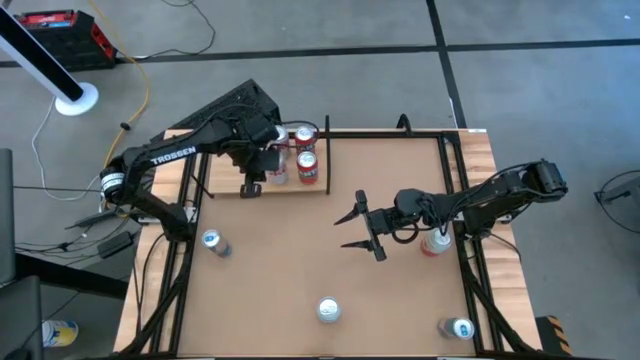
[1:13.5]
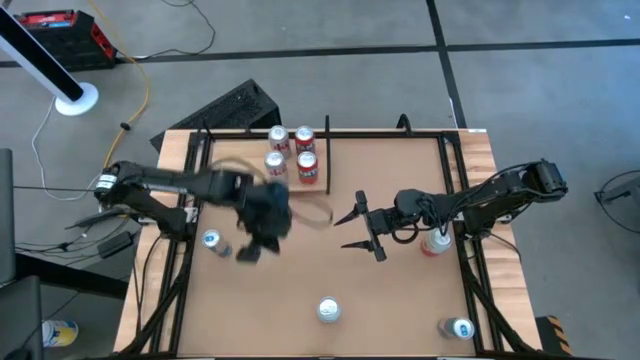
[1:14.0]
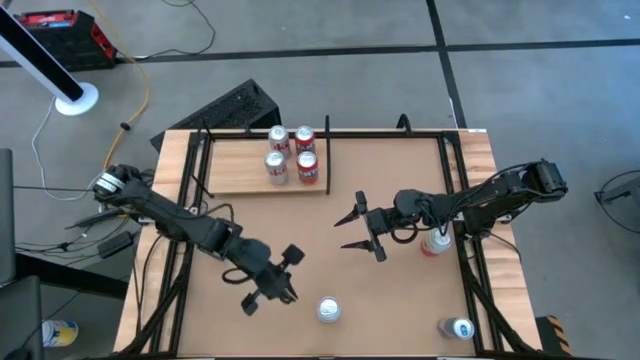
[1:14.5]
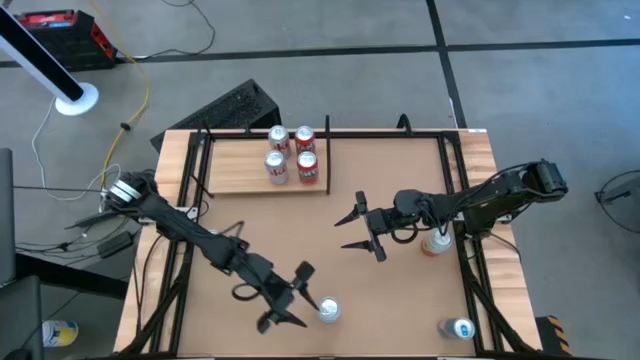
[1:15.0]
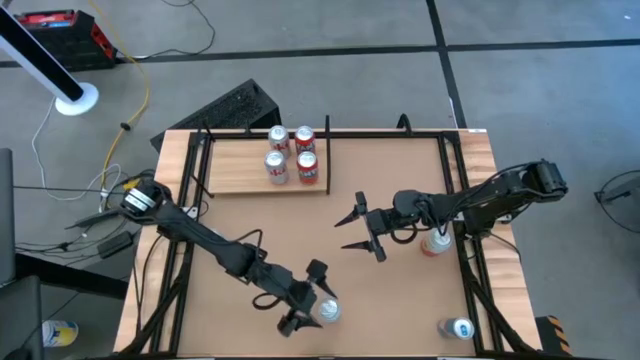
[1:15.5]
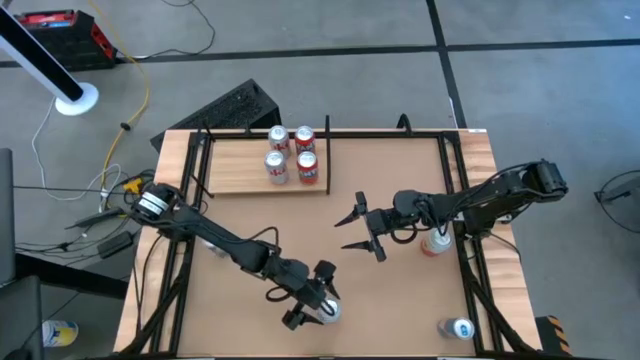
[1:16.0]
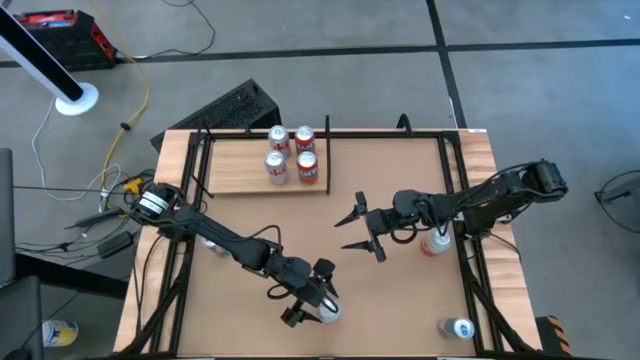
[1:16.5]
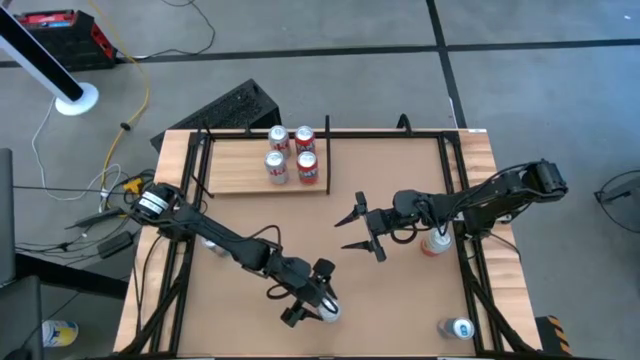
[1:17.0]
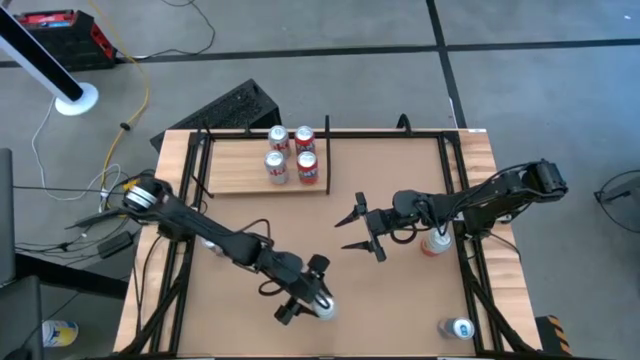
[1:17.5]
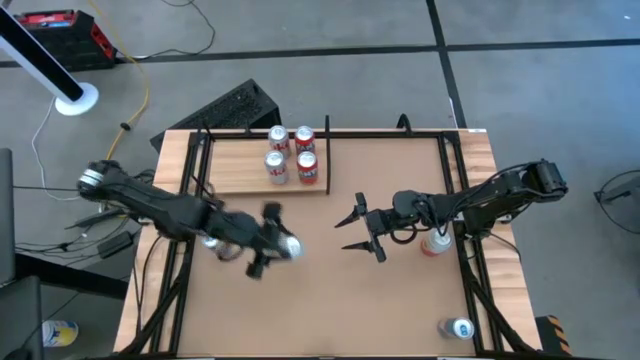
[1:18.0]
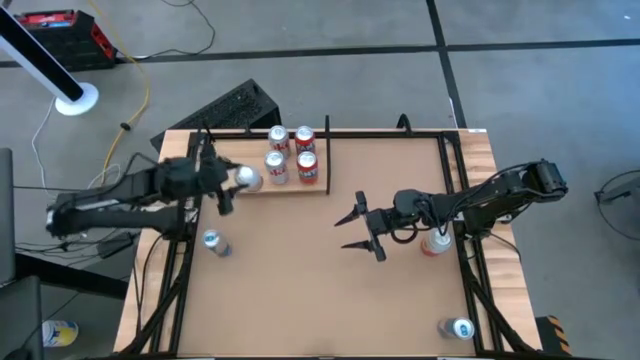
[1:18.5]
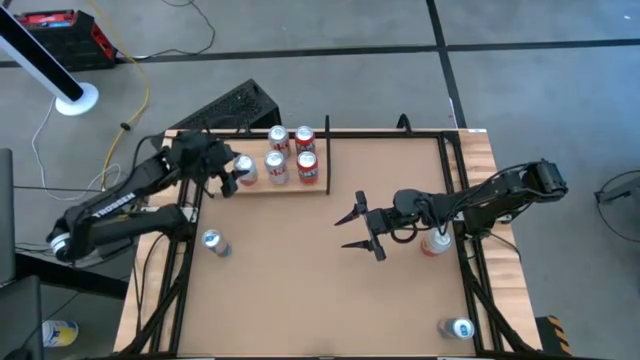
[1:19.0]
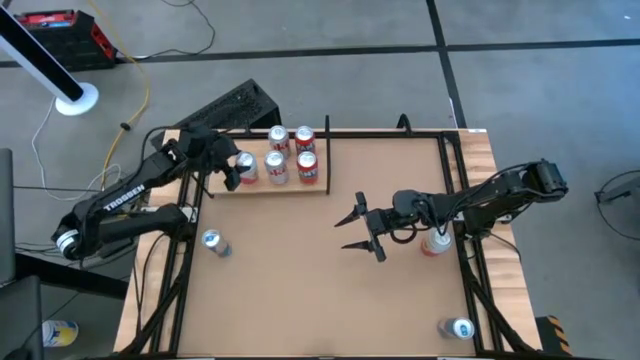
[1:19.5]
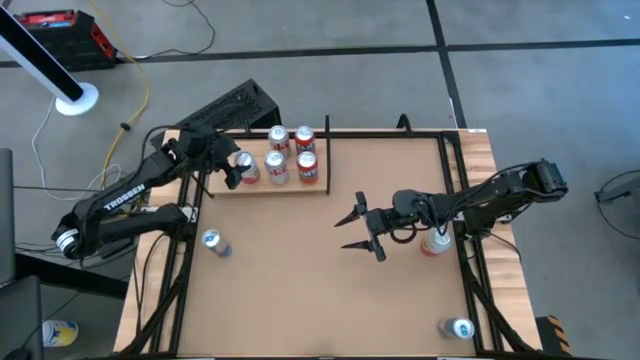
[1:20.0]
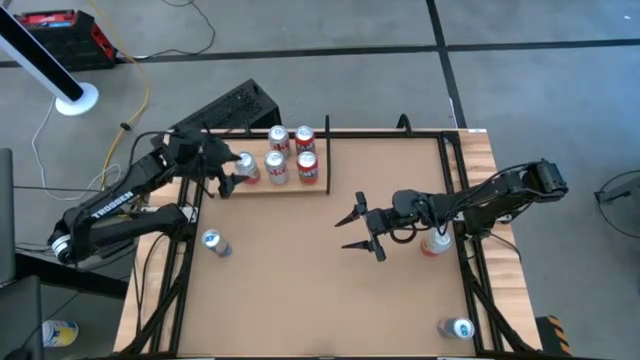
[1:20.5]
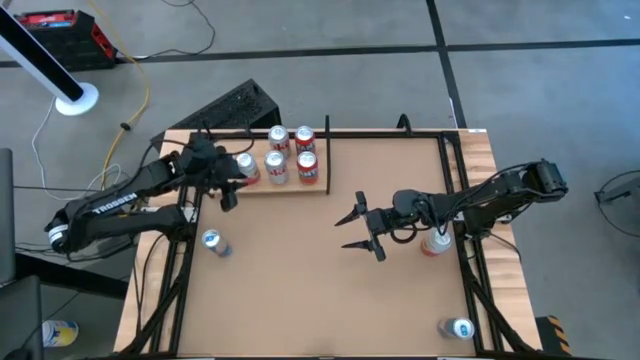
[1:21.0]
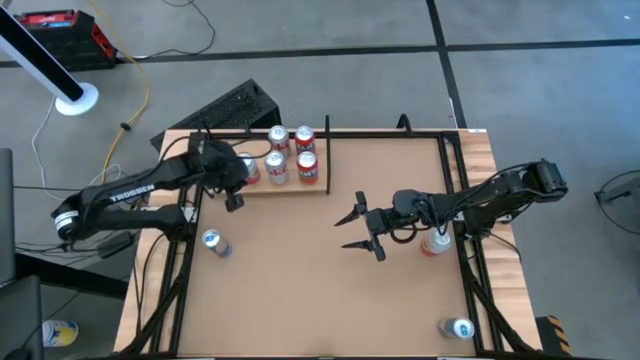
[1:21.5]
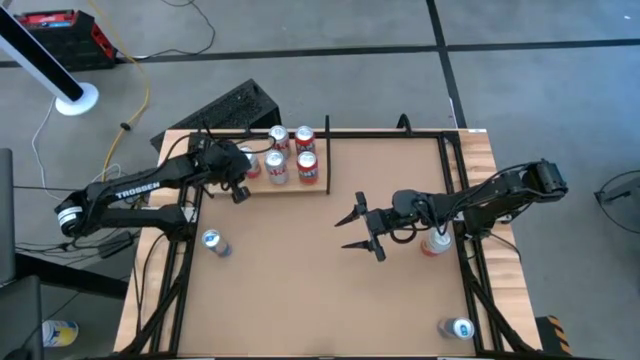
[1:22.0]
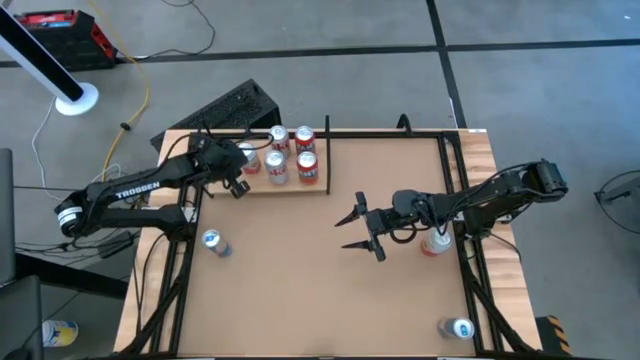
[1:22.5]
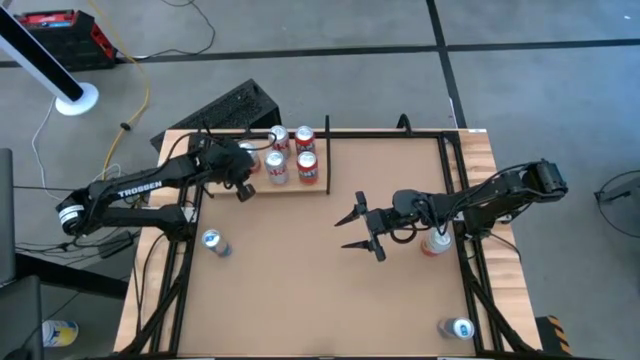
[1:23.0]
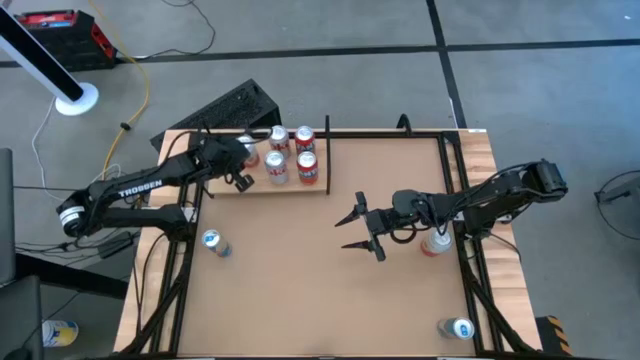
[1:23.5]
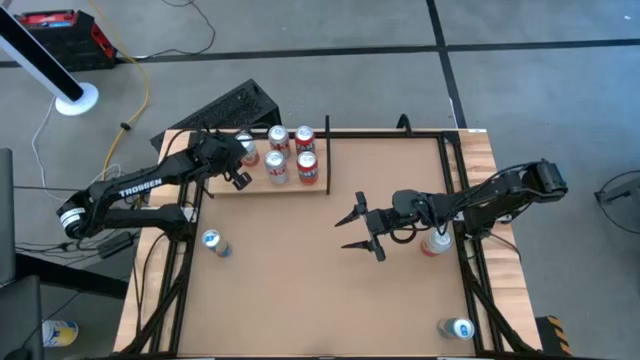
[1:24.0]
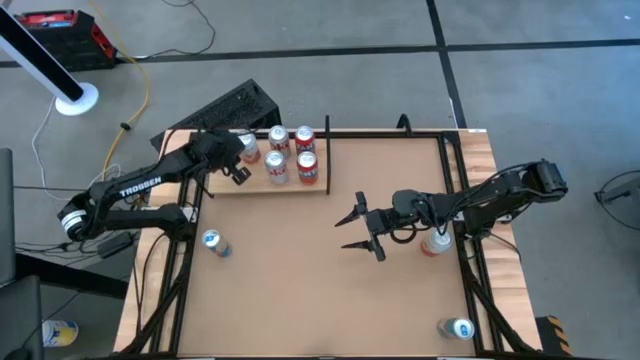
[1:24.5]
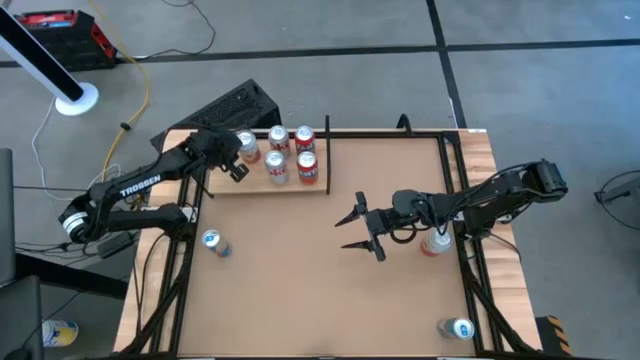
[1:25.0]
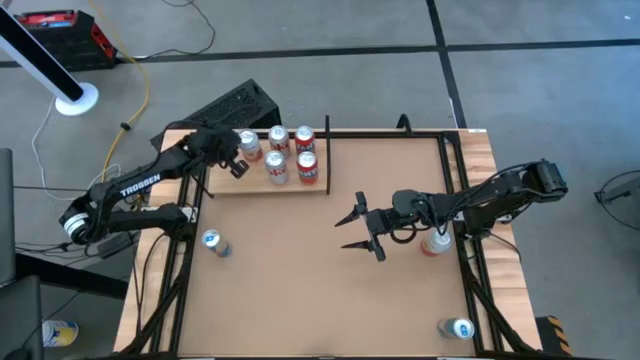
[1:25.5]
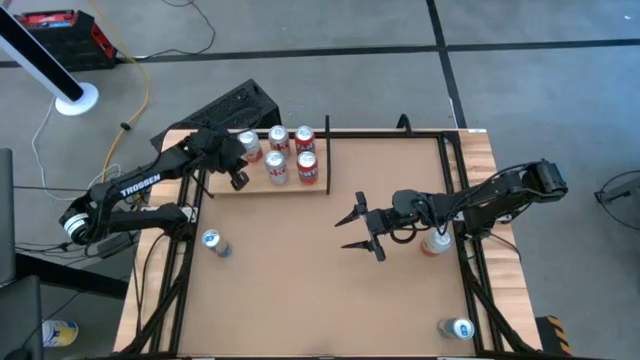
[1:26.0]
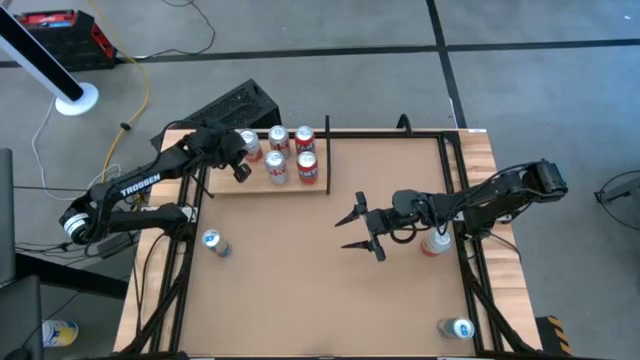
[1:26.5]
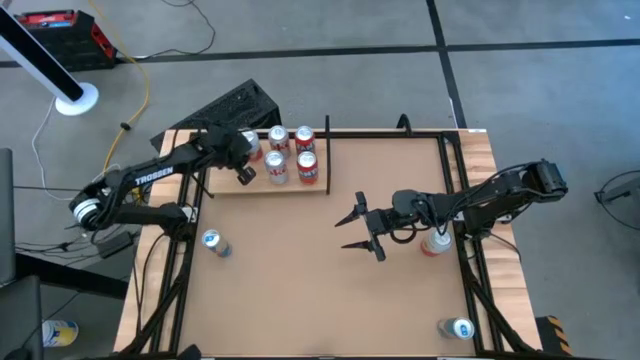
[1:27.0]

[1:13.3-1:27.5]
Task: Place canned beverage on shelf
Put the bottom pink-white soda can on the shelf

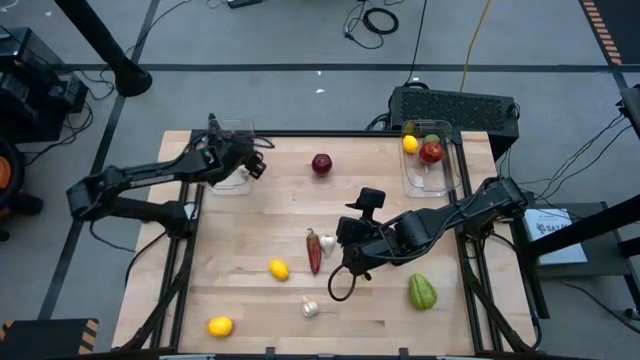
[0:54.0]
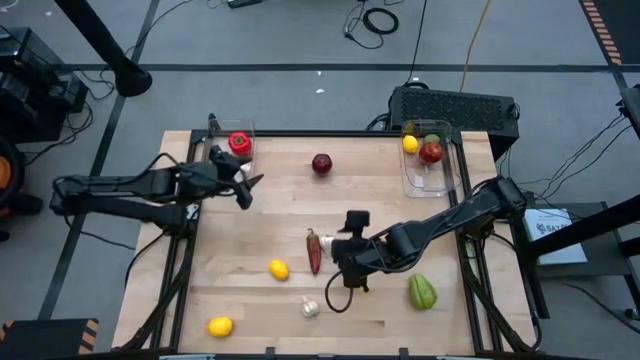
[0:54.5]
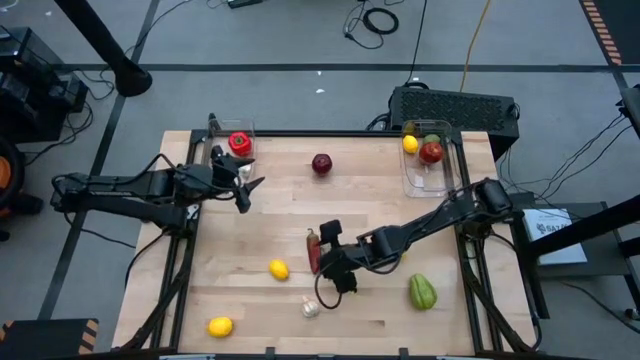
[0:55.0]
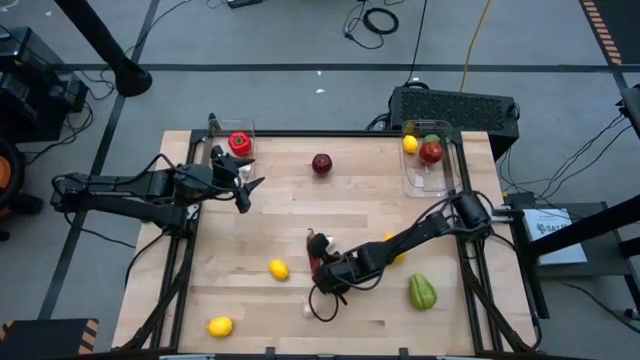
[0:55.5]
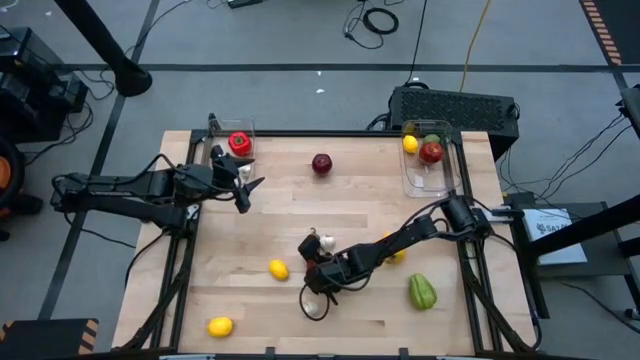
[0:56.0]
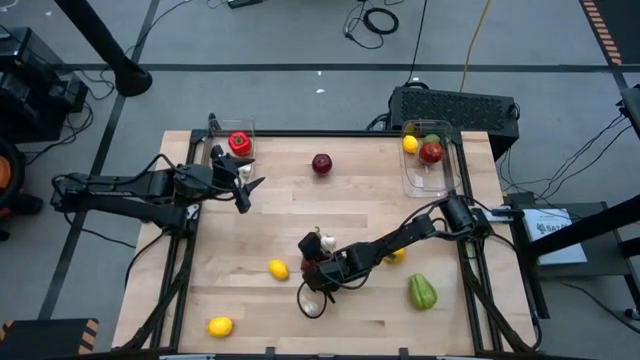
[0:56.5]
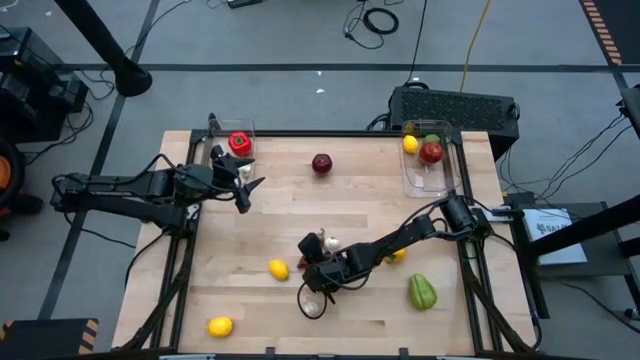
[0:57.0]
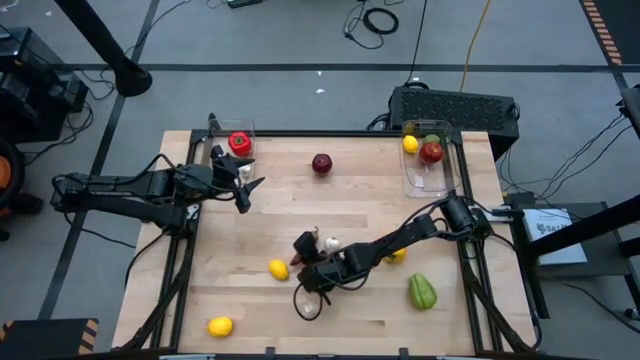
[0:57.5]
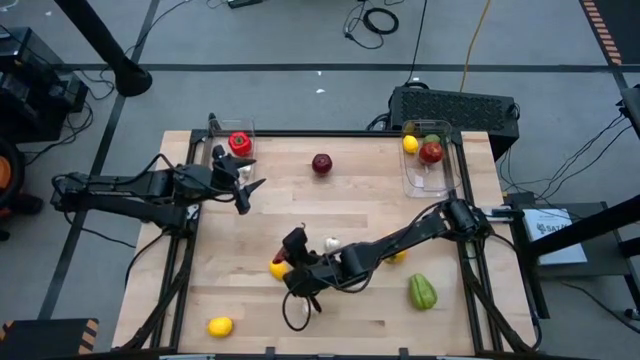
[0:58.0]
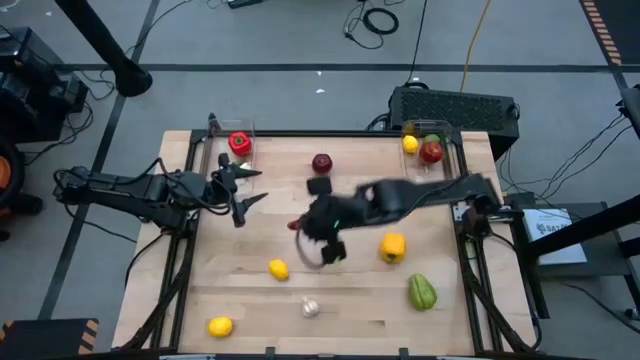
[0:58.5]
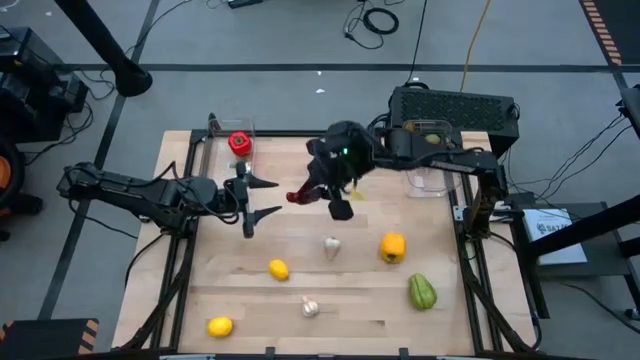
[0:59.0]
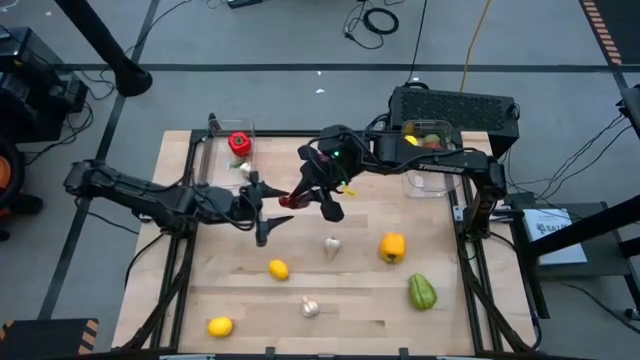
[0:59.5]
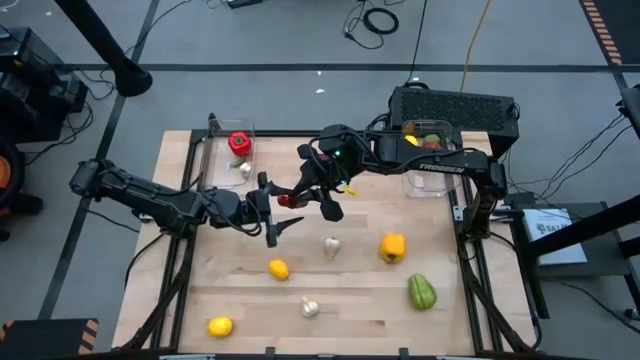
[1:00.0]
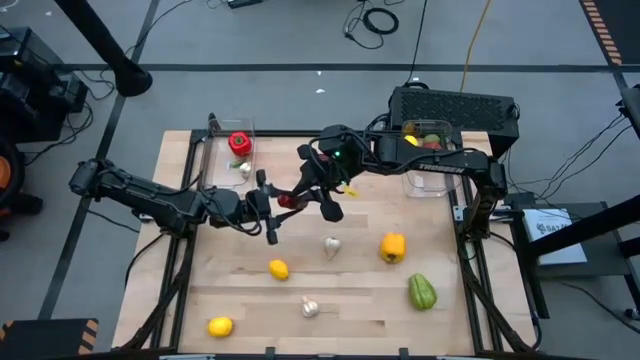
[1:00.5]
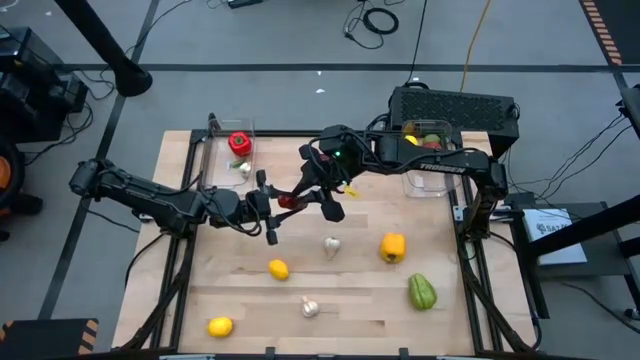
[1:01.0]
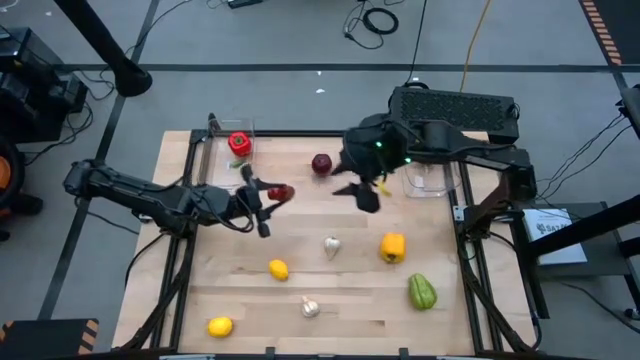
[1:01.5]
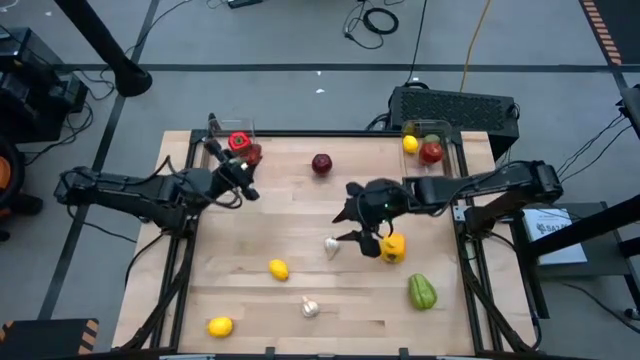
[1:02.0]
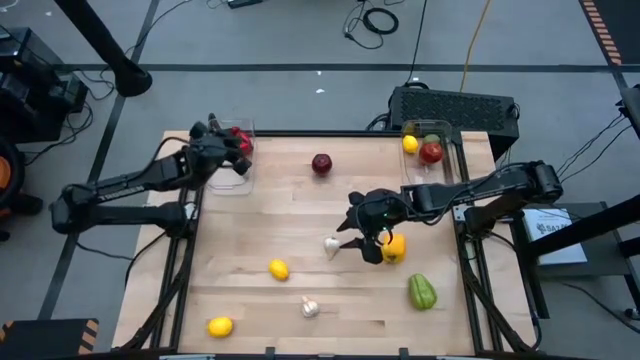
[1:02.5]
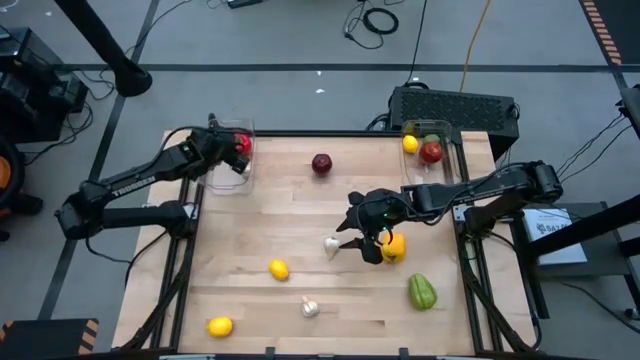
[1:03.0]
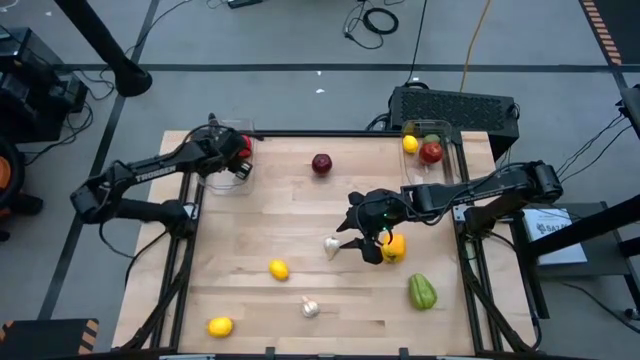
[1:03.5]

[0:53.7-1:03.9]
Task: Sort produce into baskets
Put the red chili pepper into the left transparent bin
